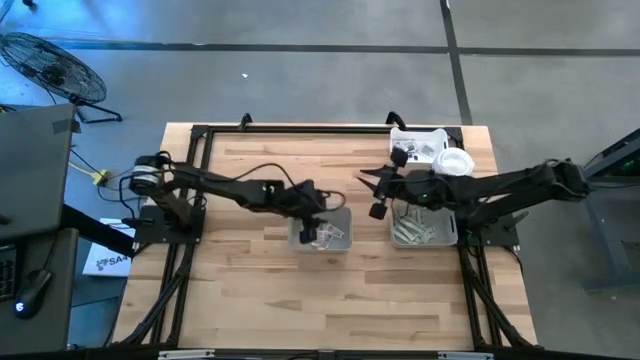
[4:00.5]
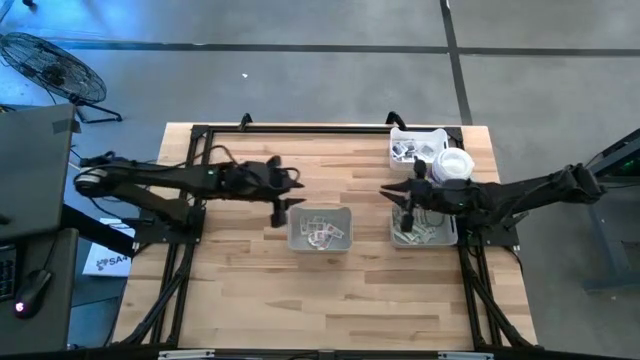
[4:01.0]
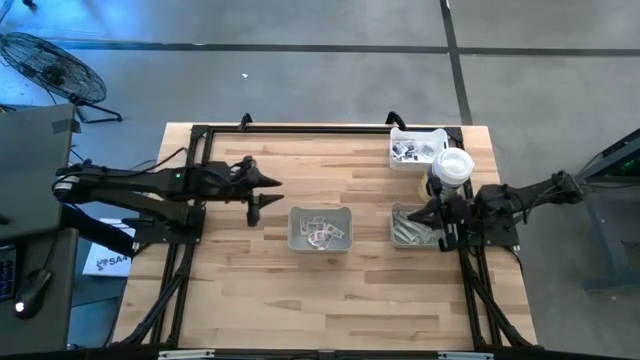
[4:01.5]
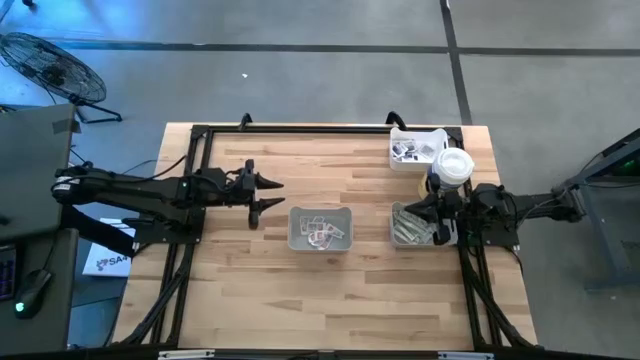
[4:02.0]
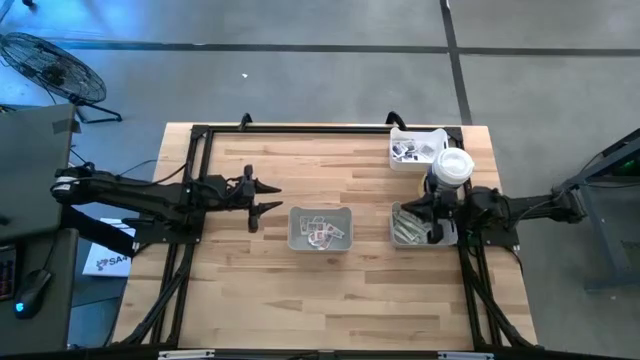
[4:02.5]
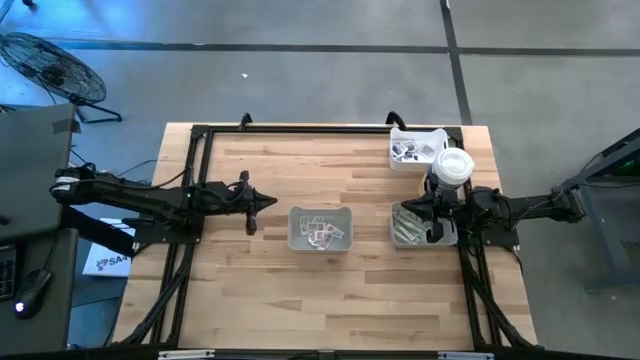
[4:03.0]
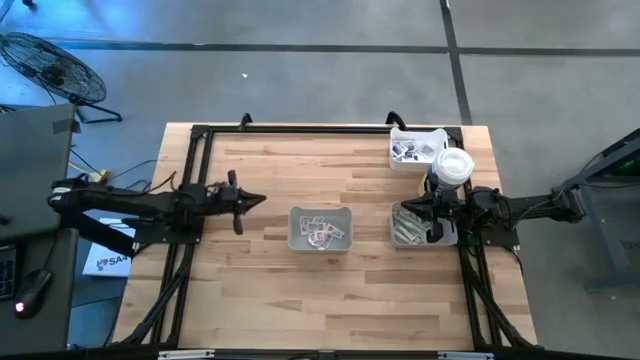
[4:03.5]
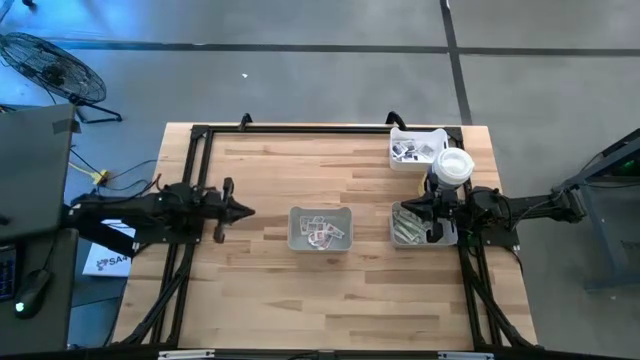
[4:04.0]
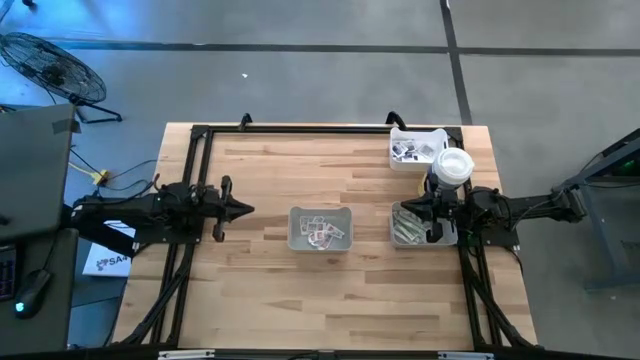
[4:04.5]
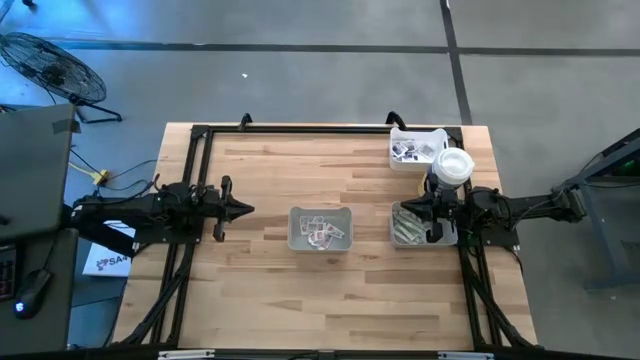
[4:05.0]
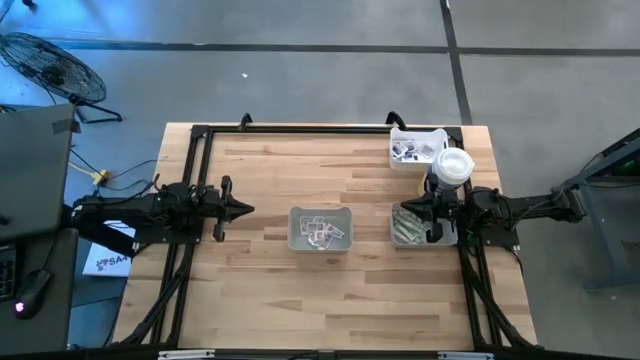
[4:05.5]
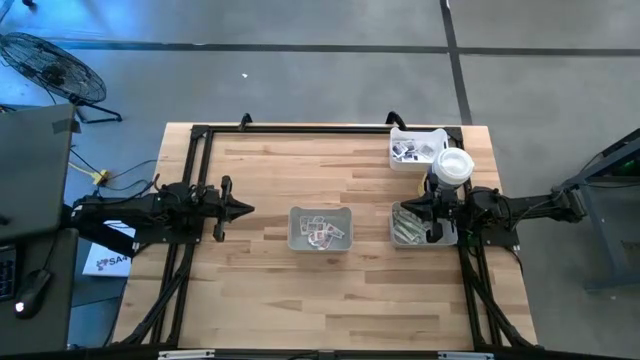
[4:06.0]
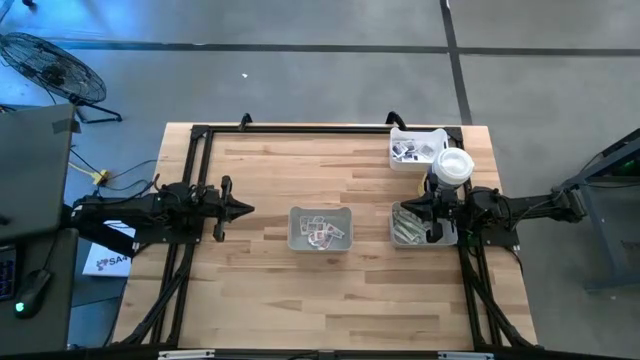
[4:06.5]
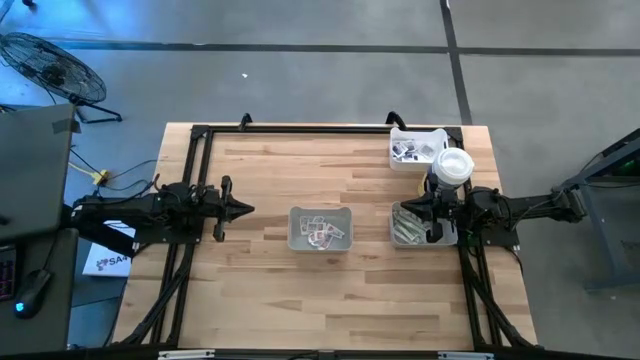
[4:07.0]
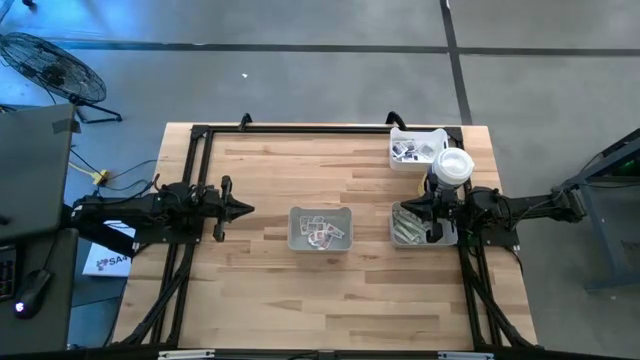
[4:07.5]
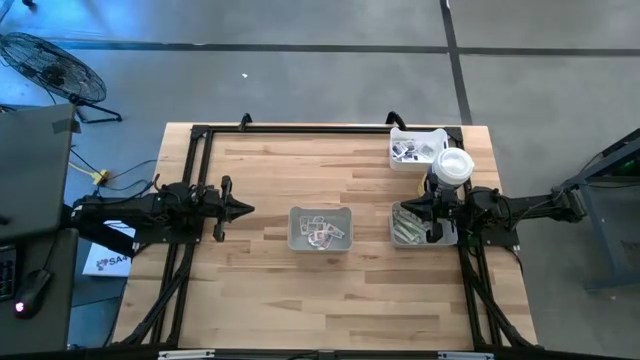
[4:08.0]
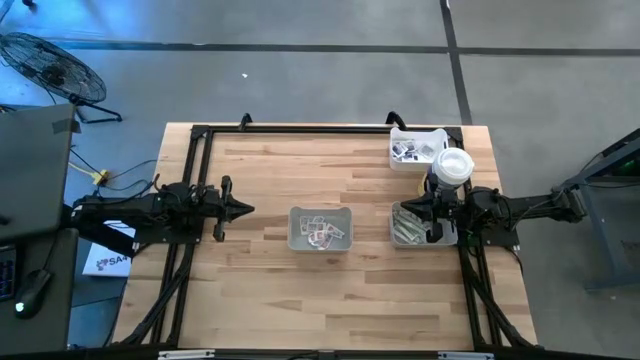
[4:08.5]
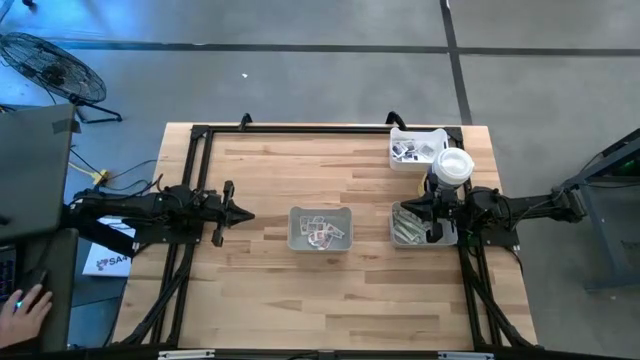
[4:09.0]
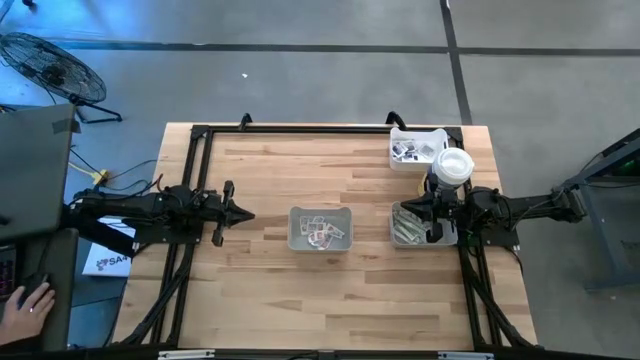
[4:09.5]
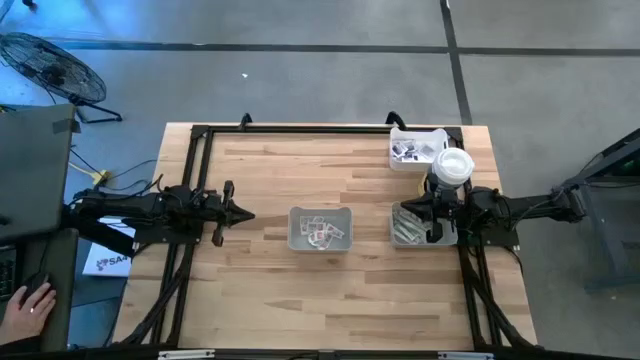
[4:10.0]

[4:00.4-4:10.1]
Task: Pick & Place First Aid Supplies
Return to Home Position

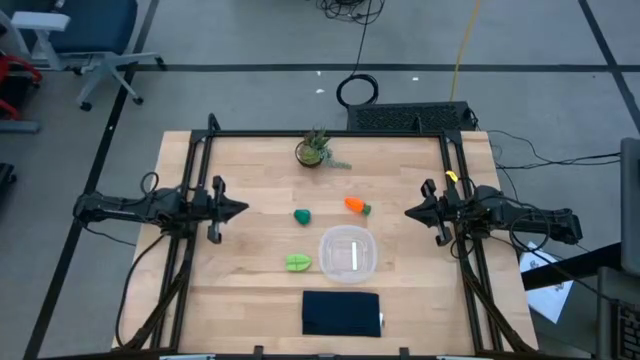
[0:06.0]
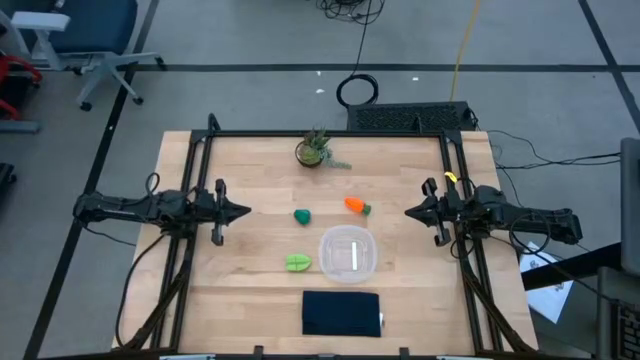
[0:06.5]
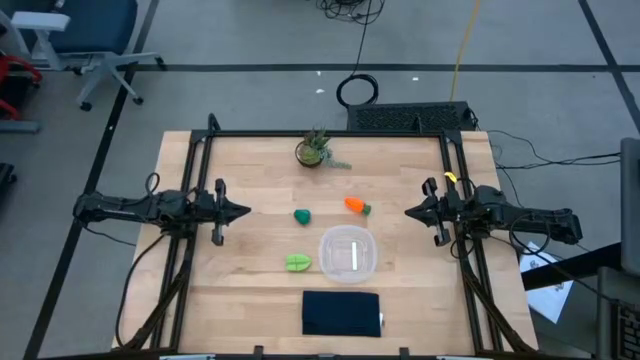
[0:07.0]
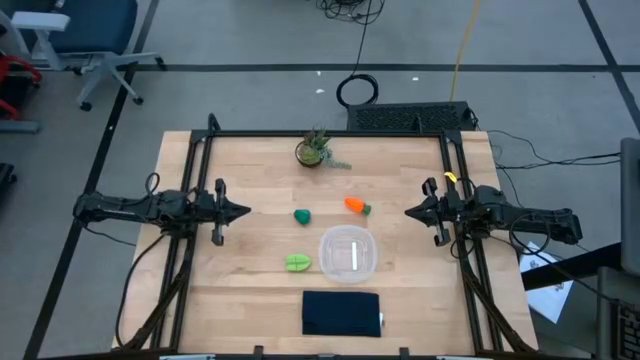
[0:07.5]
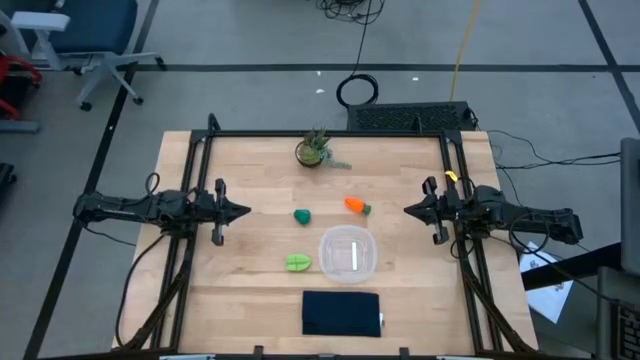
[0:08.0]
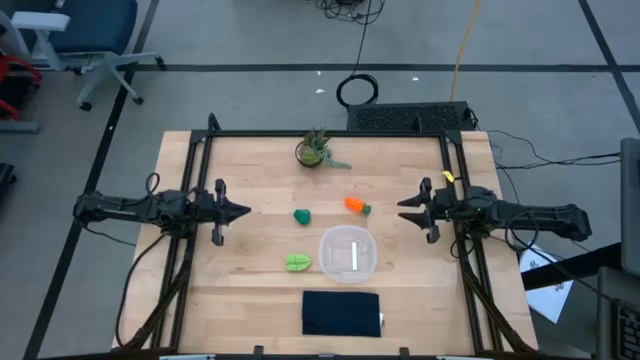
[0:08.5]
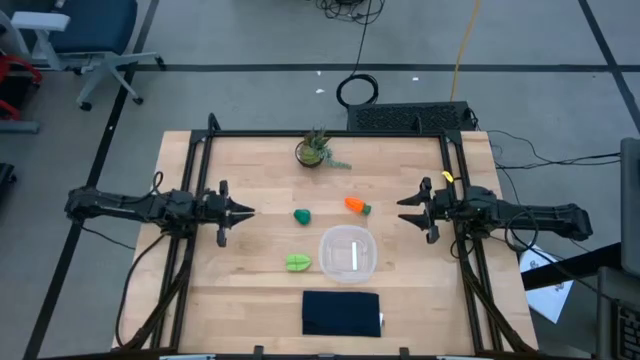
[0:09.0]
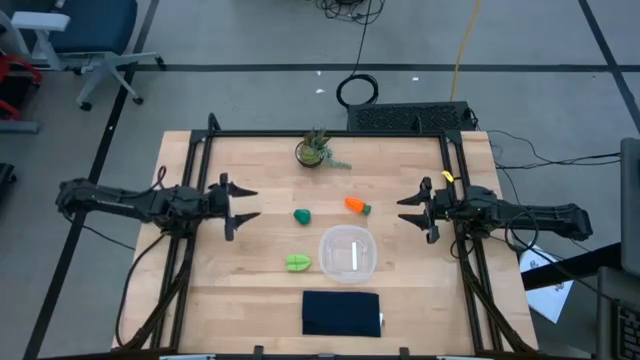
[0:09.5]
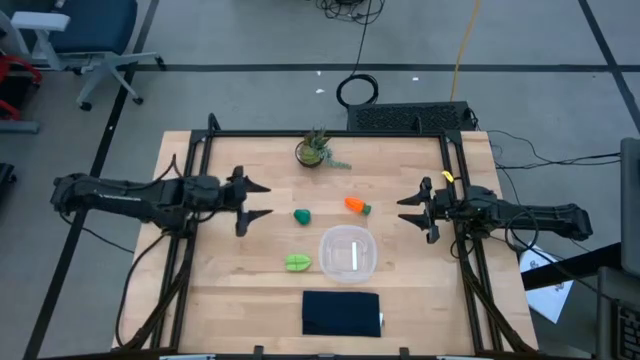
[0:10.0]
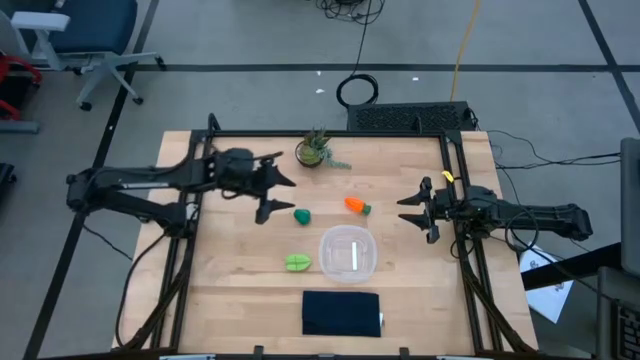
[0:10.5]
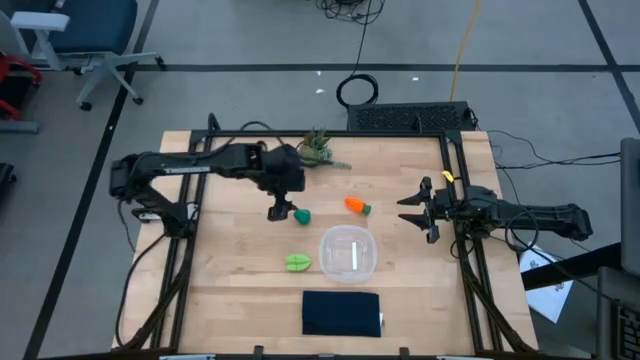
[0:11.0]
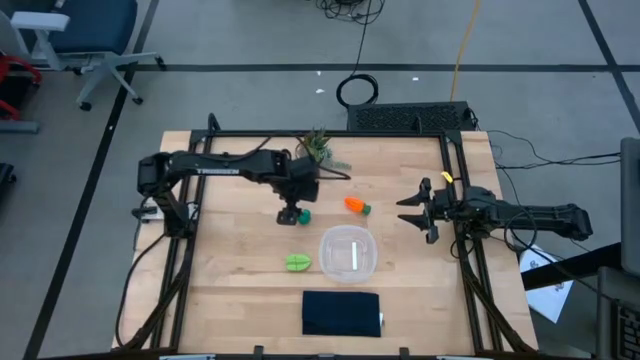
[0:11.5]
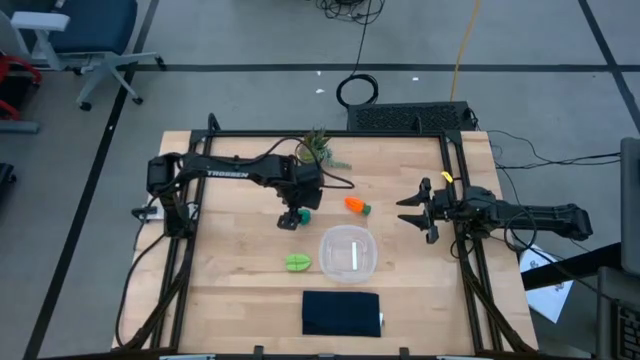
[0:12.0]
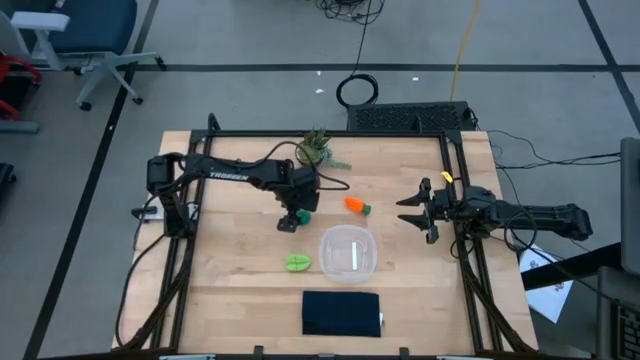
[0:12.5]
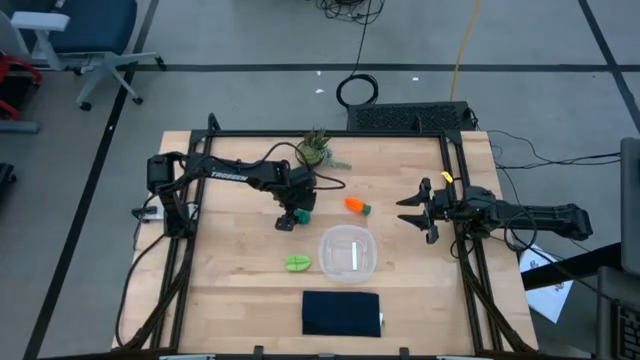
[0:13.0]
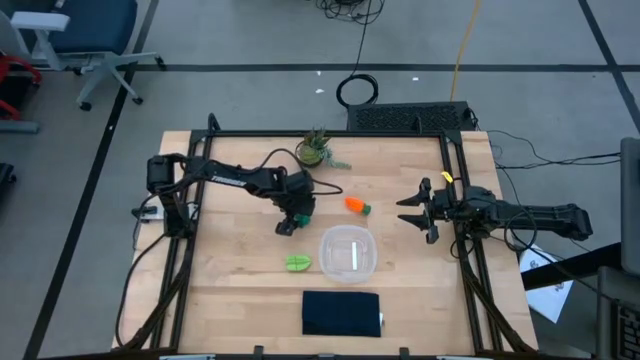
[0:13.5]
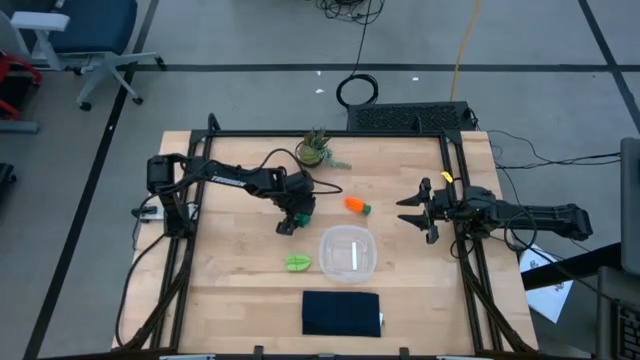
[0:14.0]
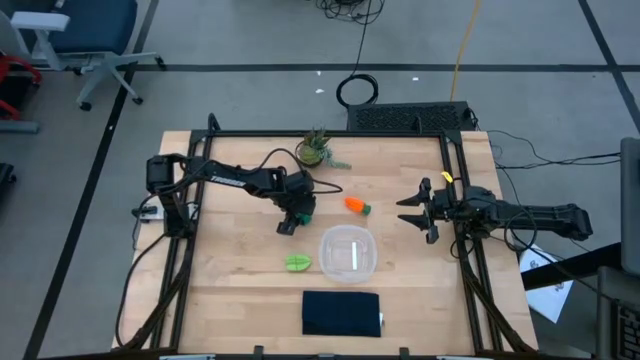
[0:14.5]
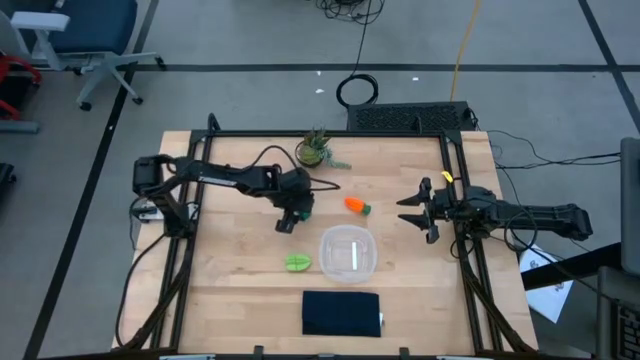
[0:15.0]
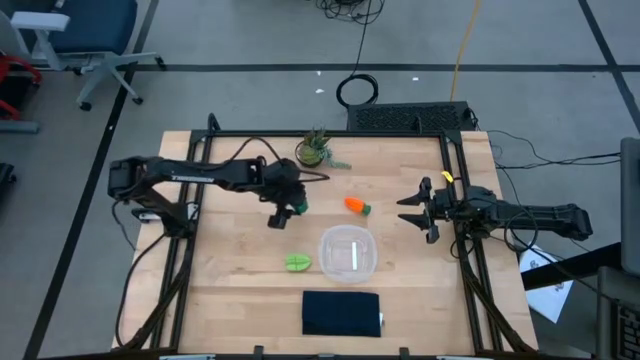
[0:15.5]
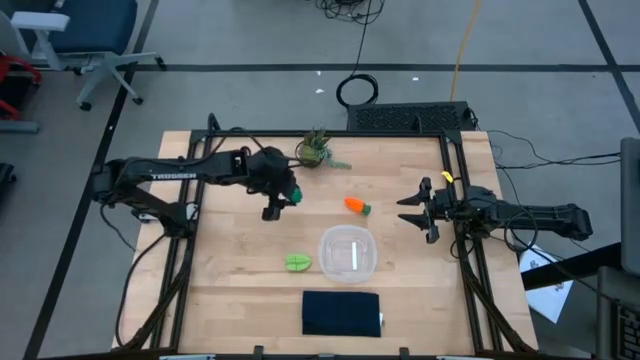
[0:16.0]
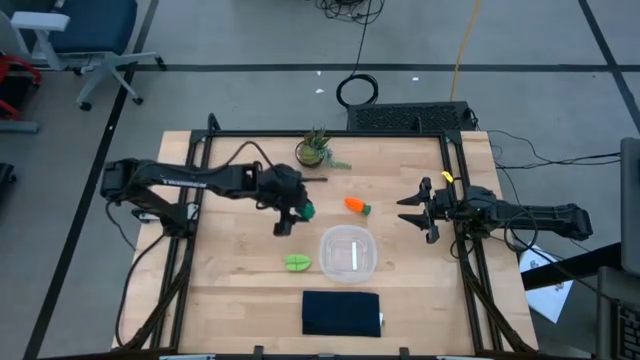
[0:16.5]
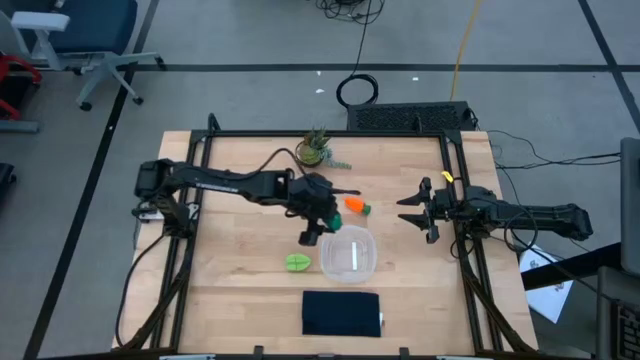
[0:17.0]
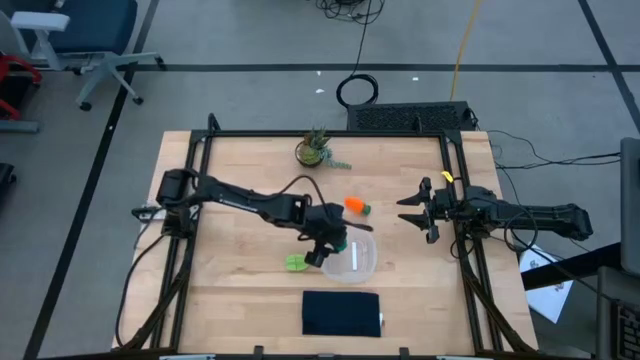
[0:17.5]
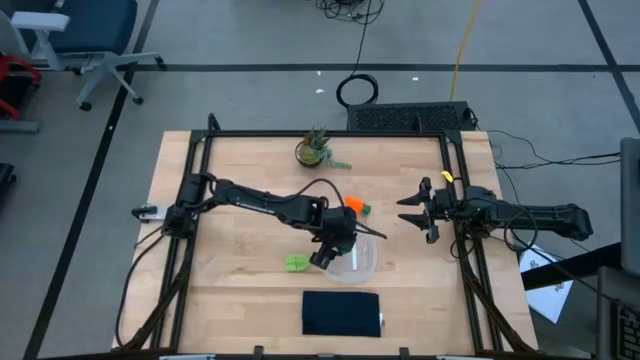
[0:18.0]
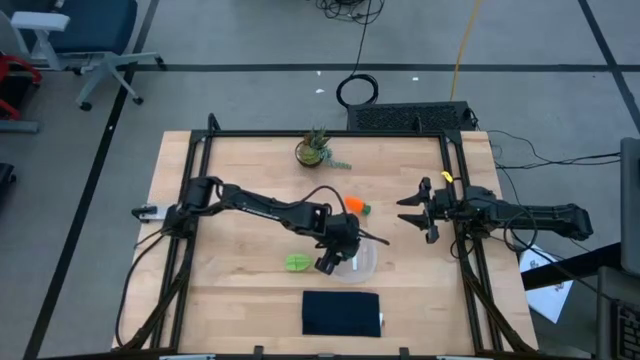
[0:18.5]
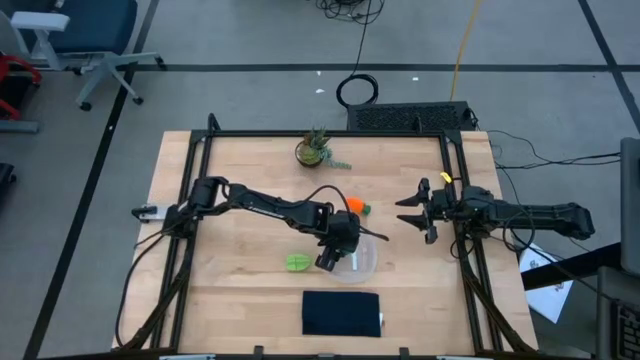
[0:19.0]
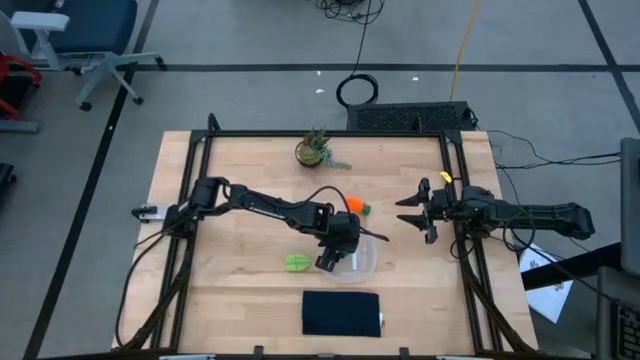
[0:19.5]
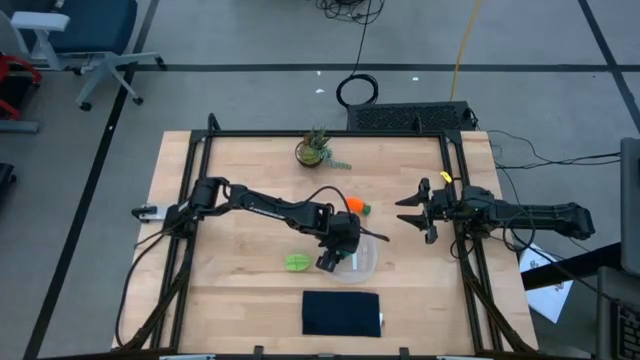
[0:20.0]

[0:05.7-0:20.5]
Task: Pick and placing Produce into tupperware
Put the green bell pepper into the transparent container
